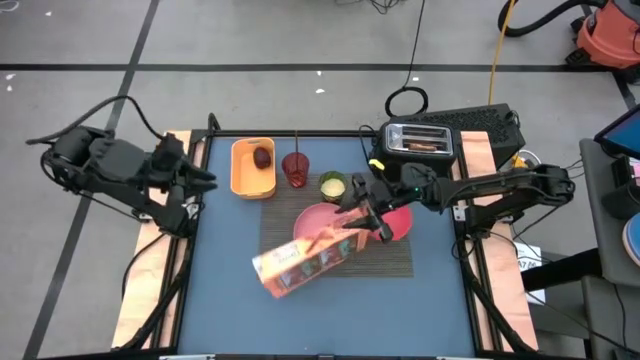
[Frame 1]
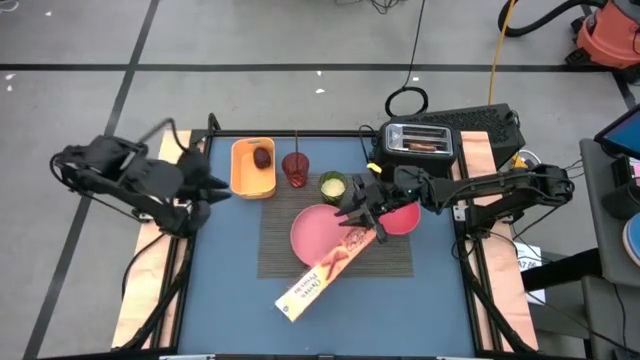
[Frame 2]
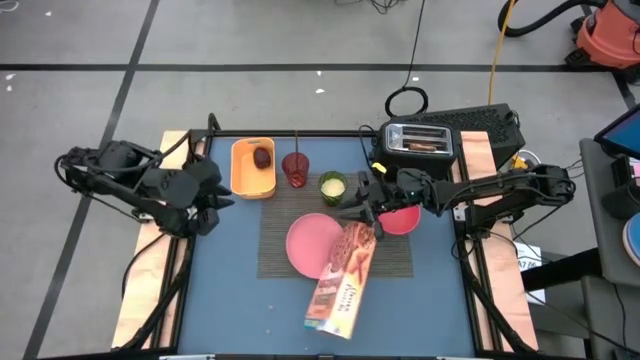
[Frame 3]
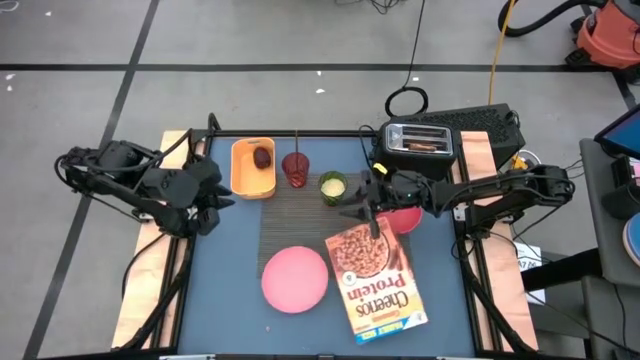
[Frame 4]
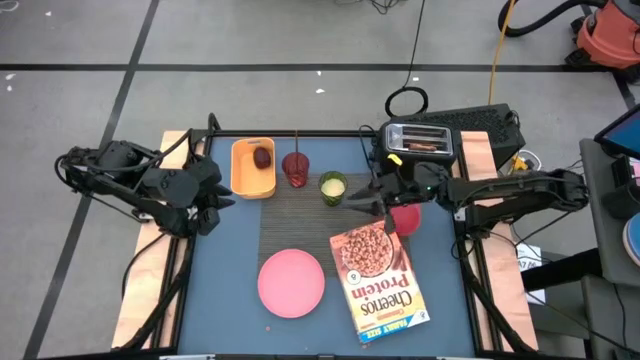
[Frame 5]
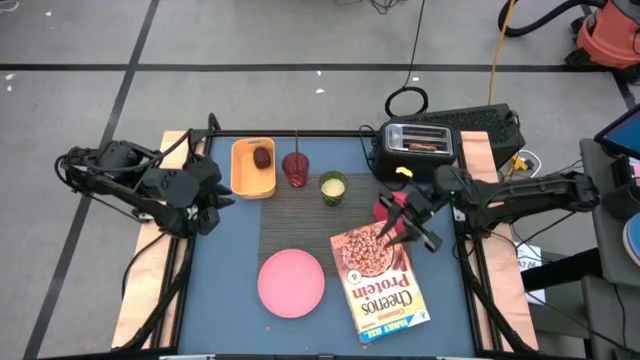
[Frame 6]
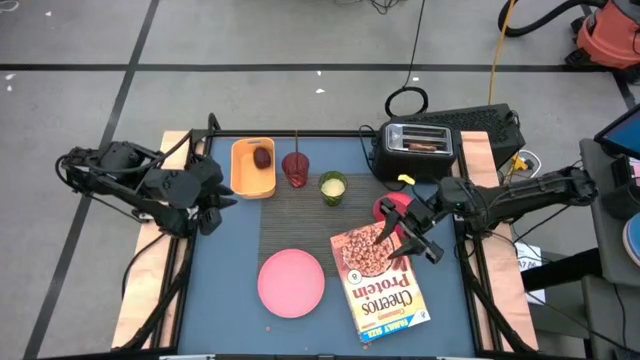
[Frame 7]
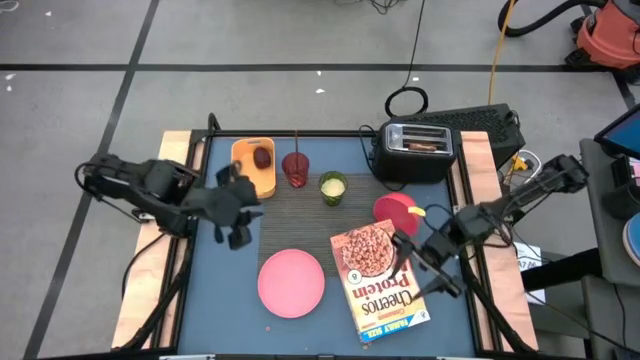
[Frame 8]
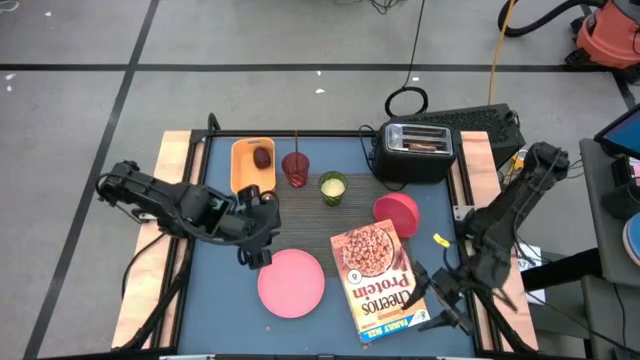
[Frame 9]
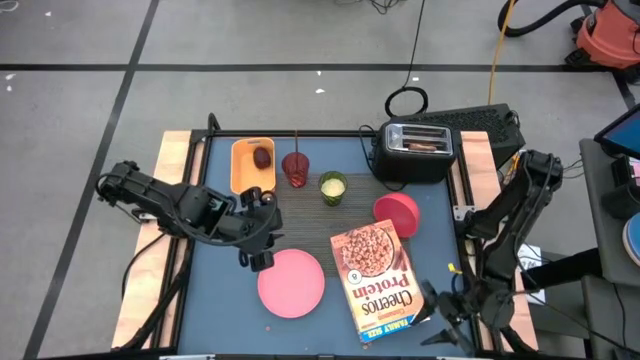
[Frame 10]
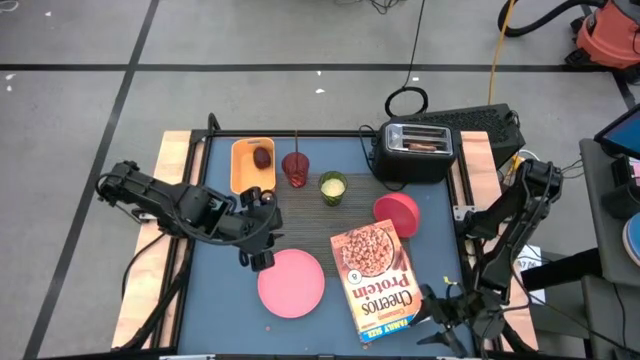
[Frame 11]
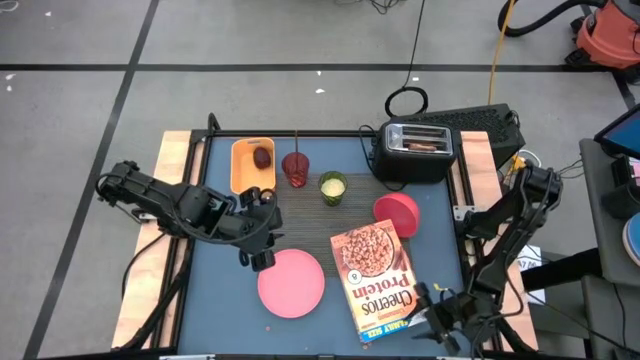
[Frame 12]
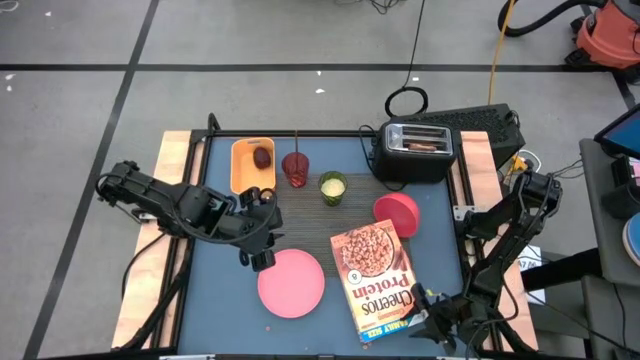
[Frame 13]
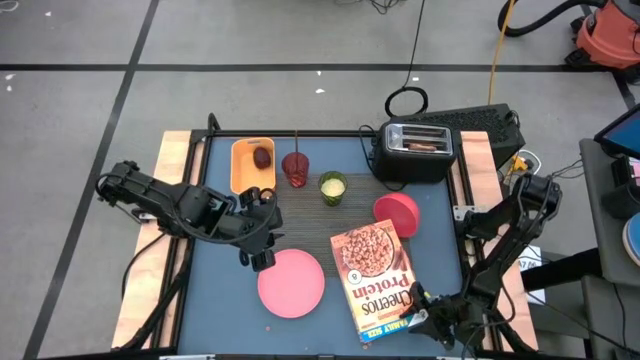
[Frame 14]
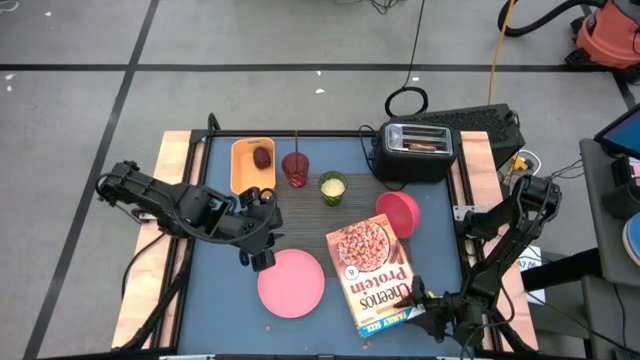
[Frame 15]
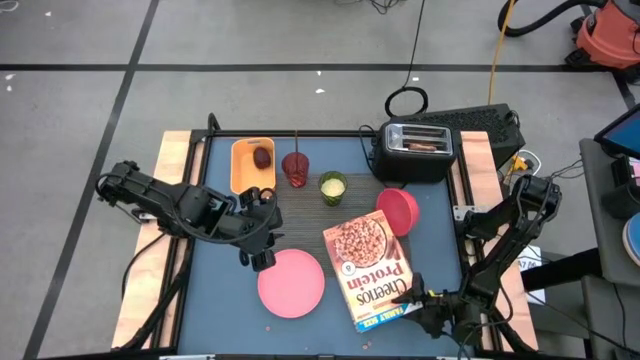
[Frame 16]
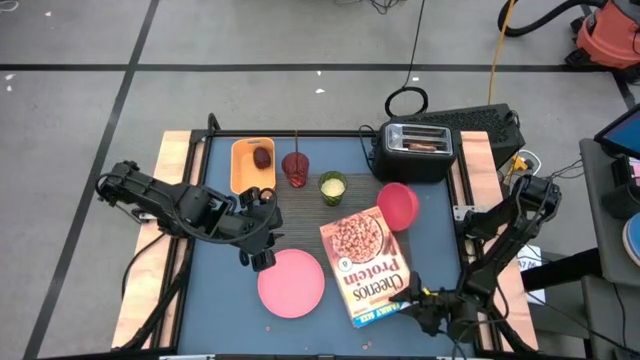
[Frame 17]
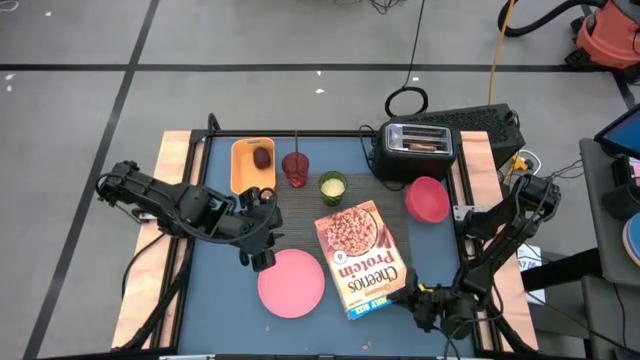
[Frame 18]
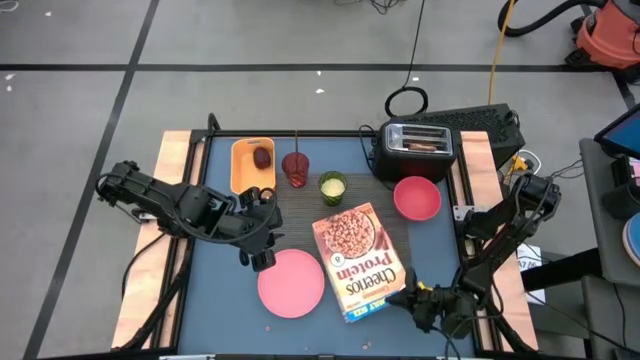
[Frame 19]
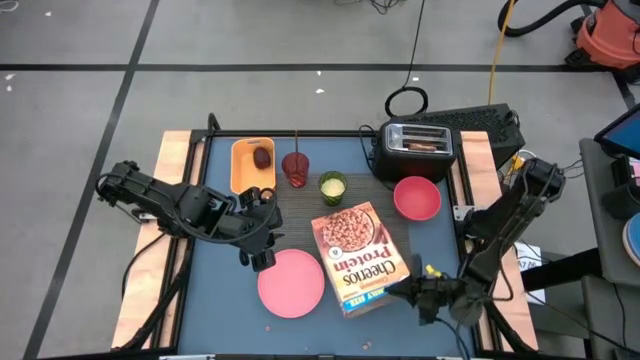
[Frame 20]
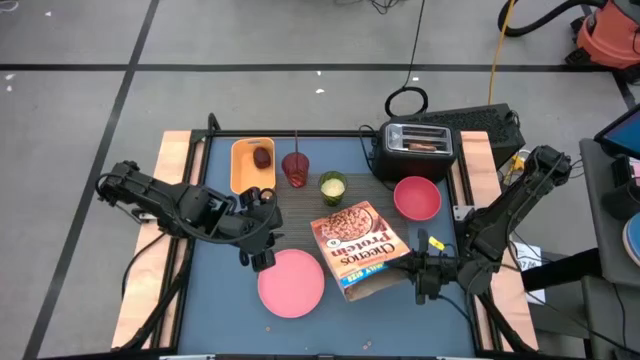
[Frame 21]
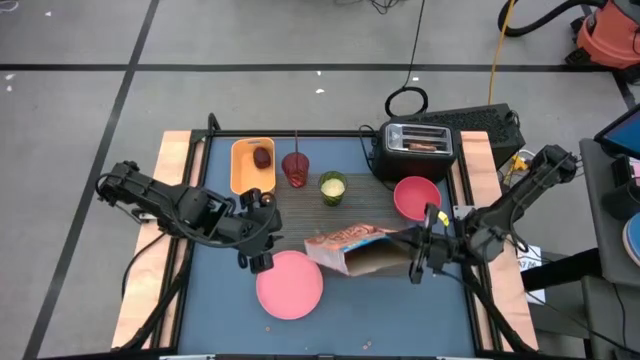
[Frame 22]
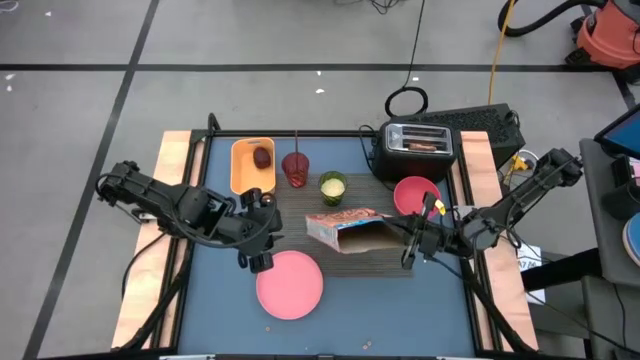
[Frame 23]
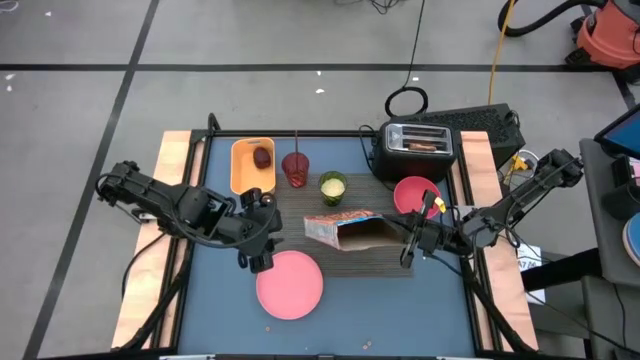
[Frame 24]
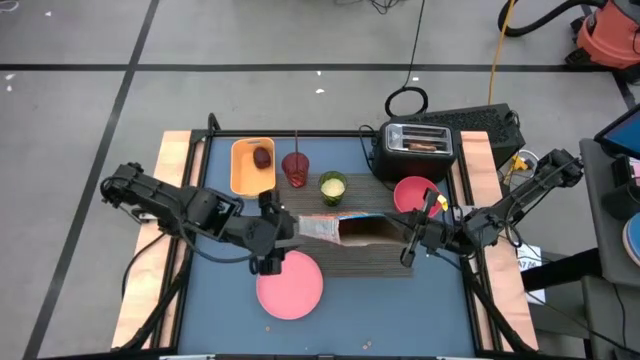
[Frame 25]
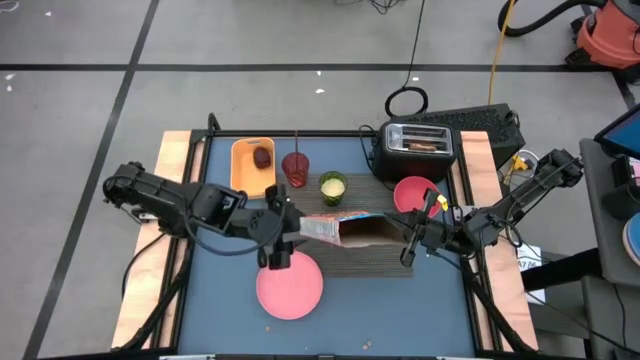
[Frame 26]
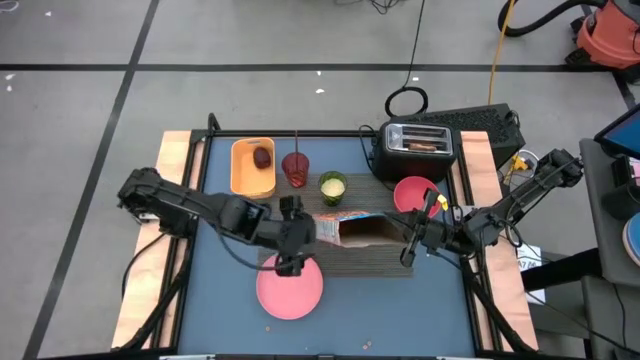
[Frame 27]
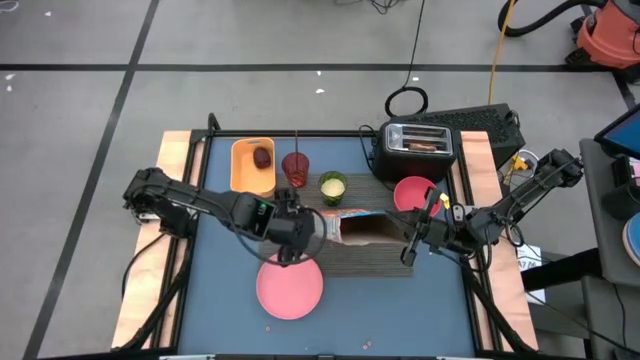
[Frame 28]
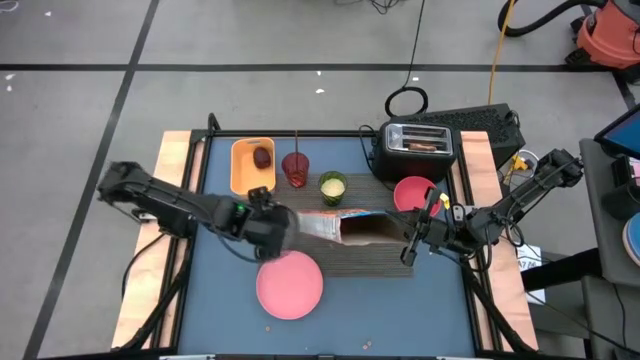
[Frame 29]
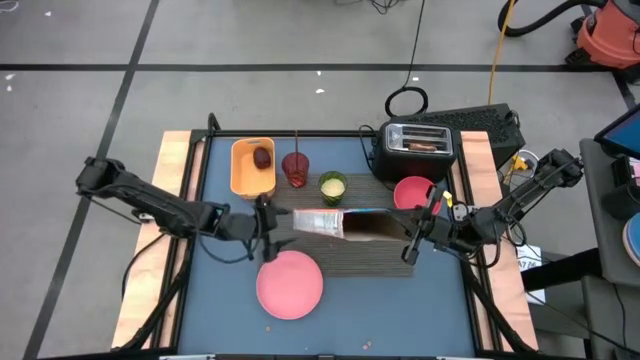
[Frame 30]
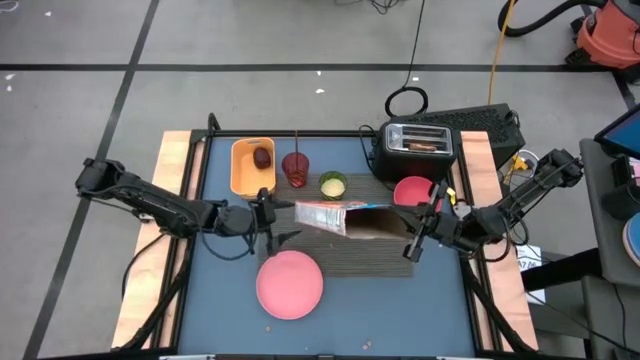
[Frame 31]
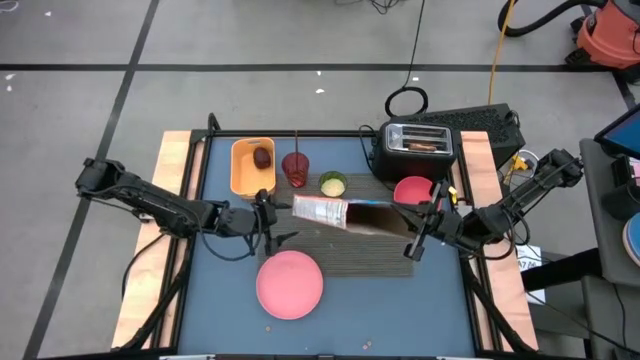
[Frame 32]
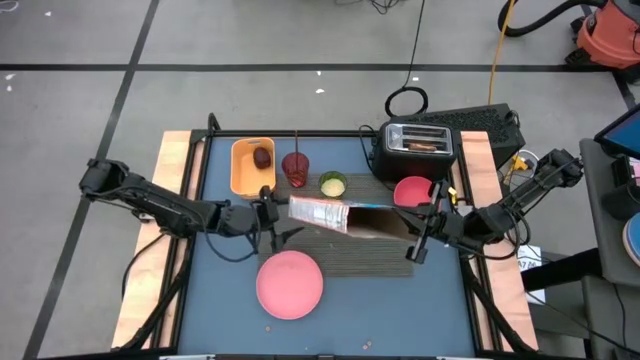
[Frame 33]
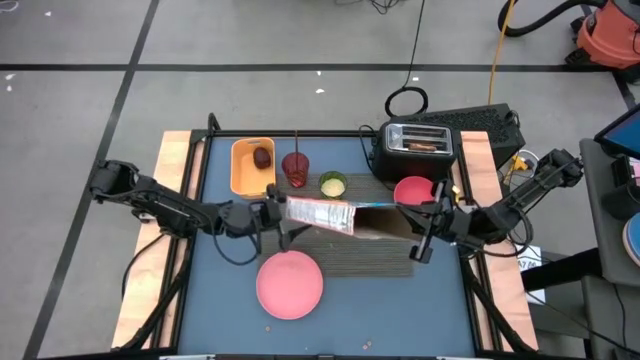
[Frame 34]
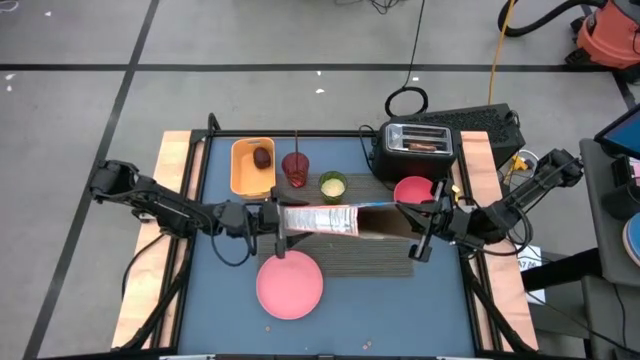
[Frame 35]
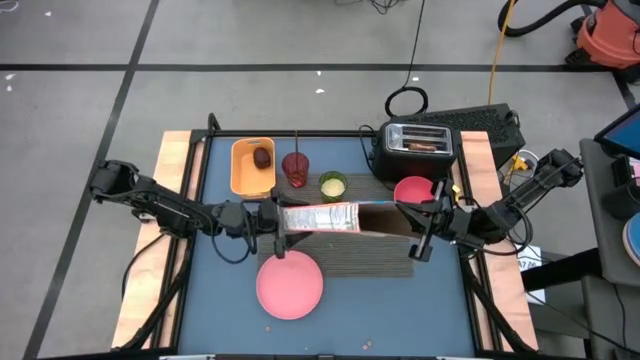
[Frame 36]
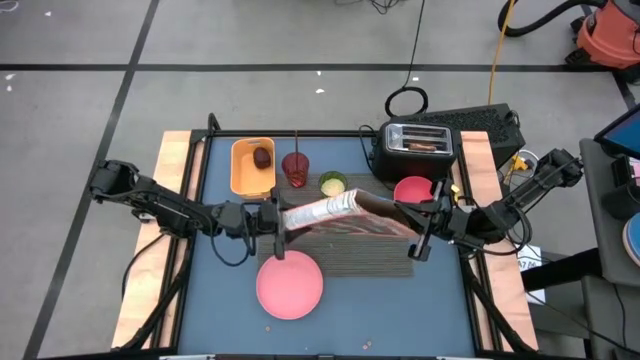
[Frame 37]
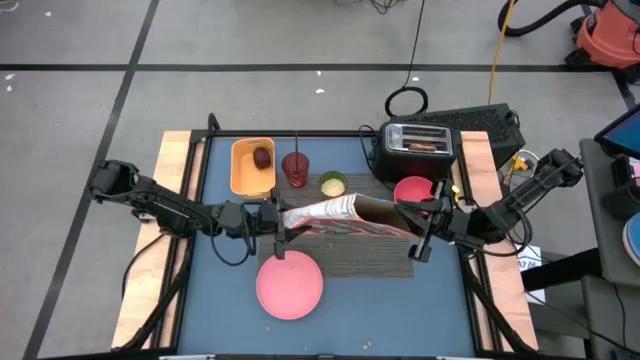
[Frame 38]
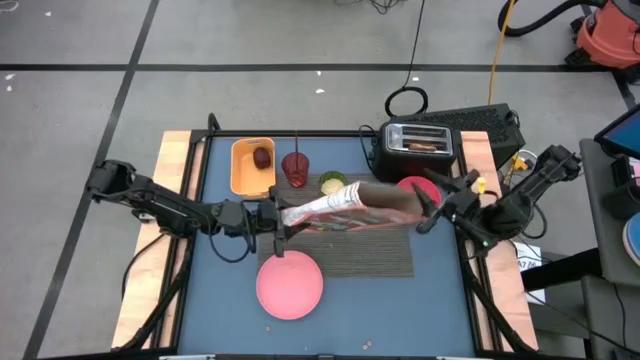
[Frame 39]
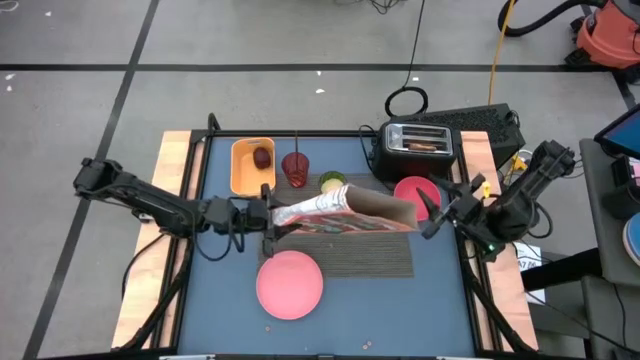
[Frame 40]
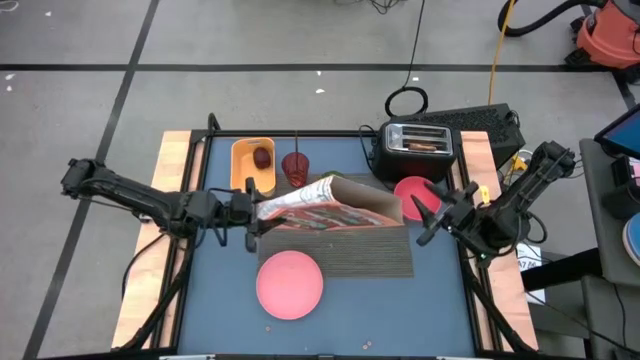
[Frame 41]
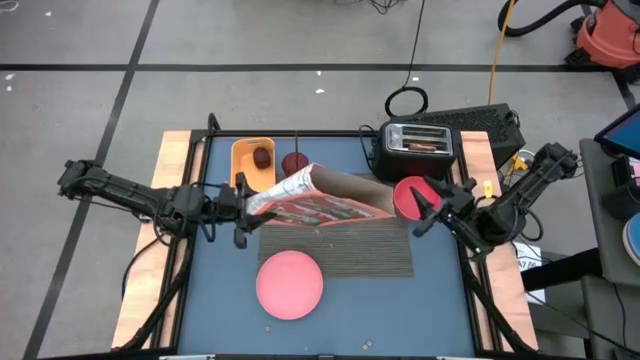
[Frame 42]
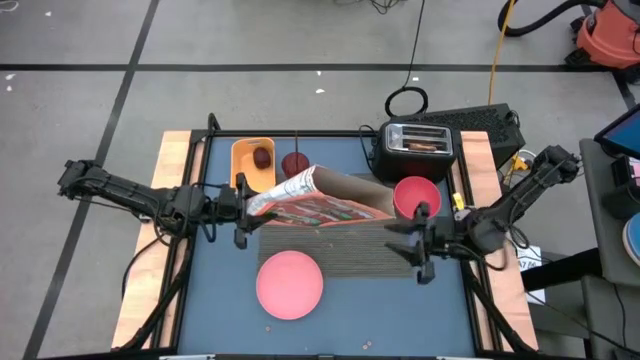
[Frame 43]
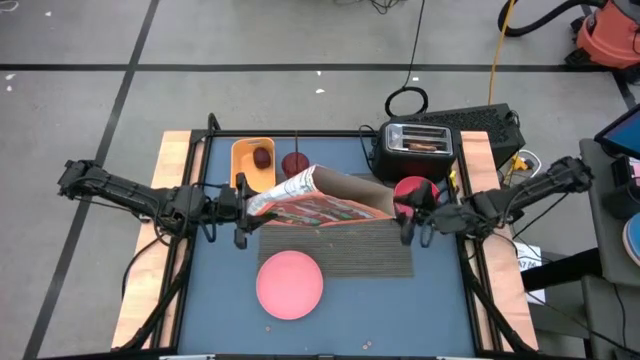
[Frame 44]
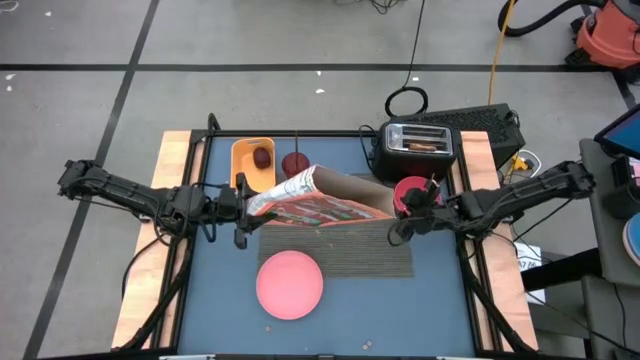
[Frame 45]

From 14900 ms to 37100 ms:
Task: Arrange a breakfast setting
Pour the cereal from the cereal box into the pink bowl
